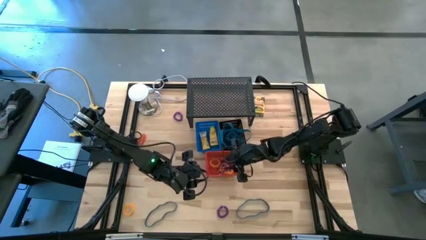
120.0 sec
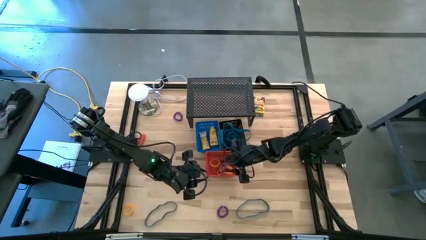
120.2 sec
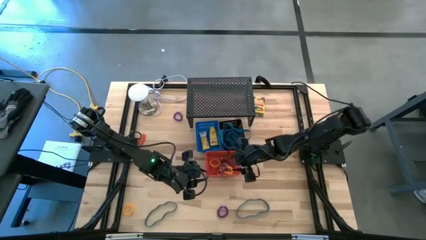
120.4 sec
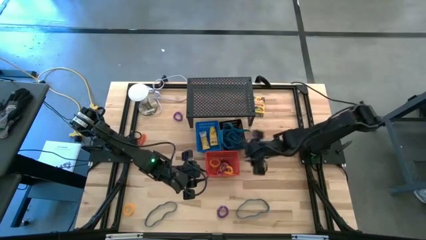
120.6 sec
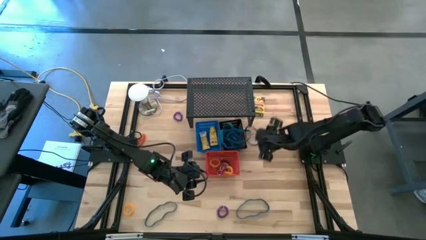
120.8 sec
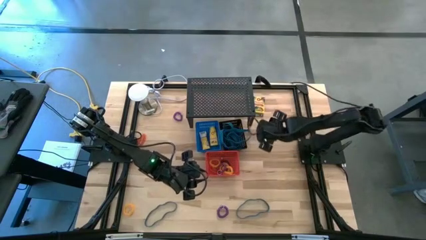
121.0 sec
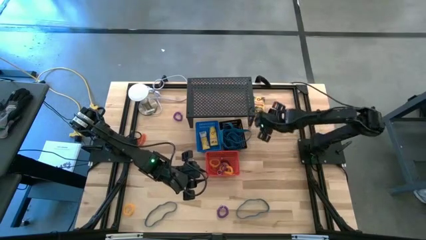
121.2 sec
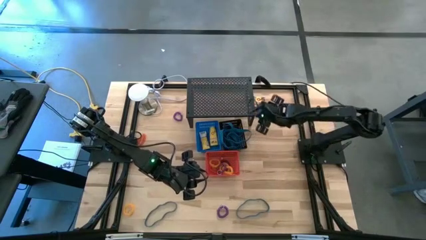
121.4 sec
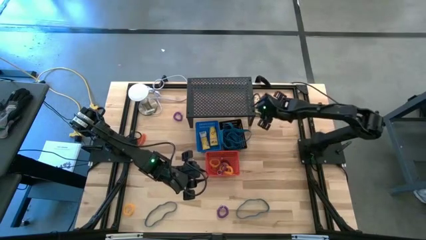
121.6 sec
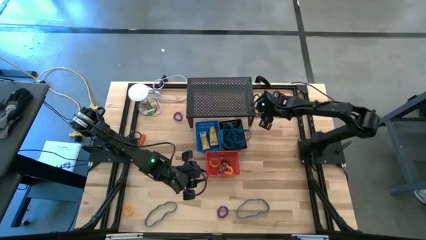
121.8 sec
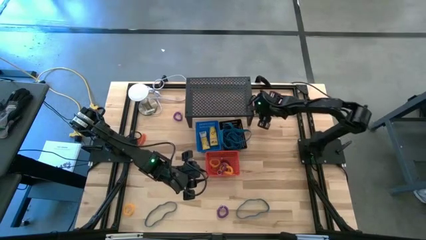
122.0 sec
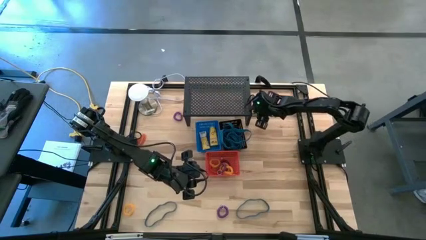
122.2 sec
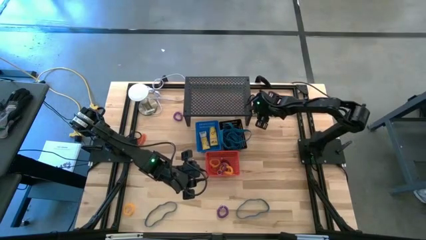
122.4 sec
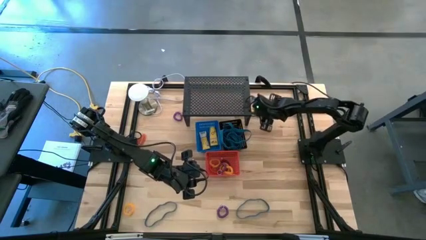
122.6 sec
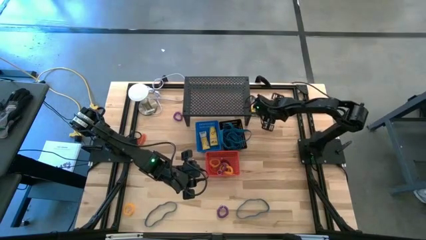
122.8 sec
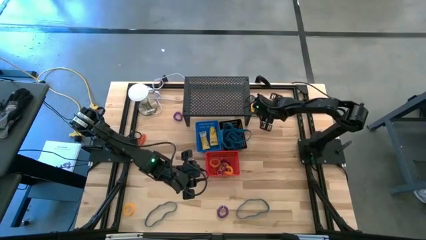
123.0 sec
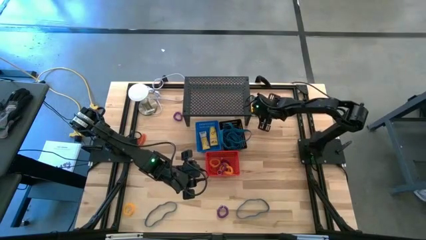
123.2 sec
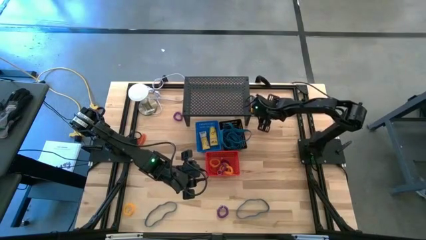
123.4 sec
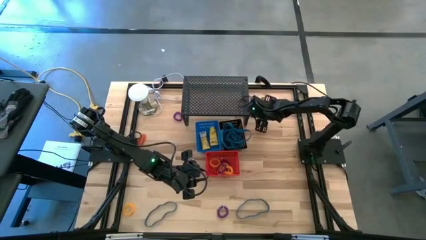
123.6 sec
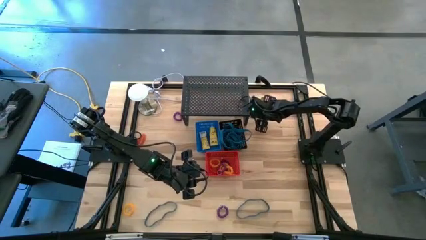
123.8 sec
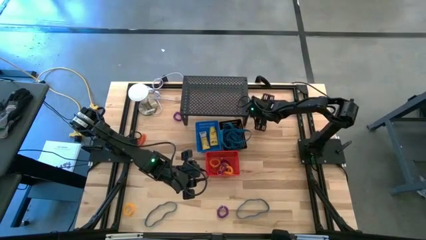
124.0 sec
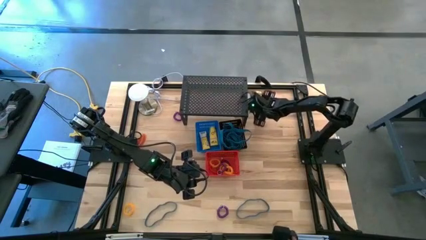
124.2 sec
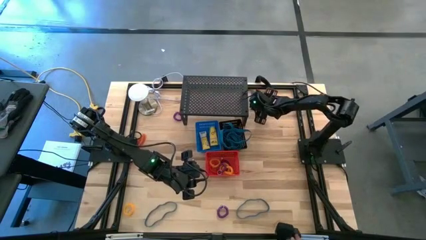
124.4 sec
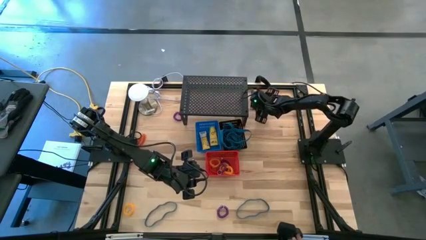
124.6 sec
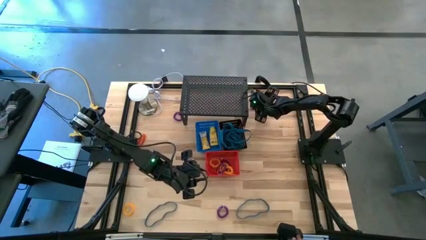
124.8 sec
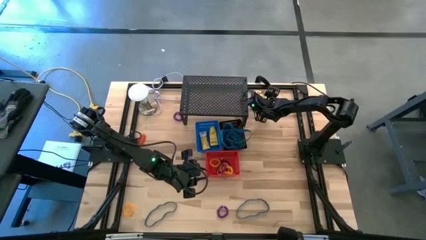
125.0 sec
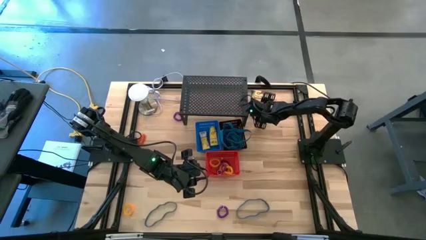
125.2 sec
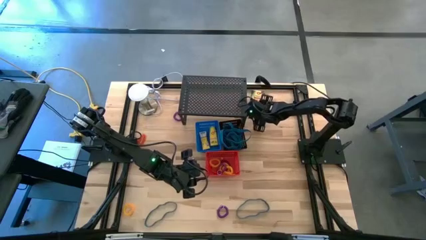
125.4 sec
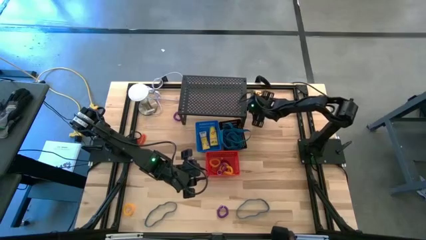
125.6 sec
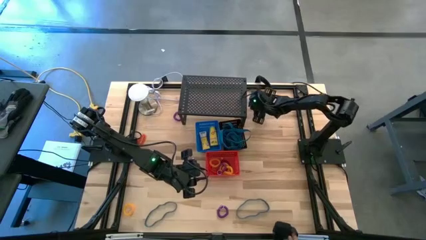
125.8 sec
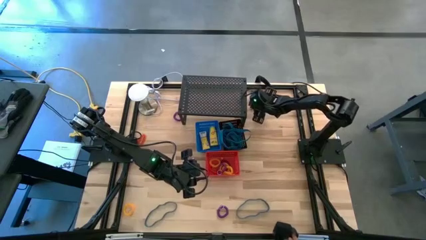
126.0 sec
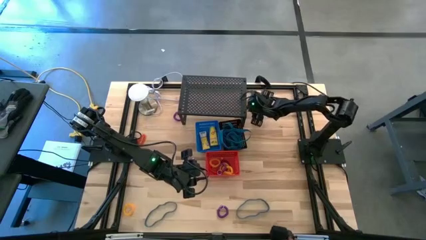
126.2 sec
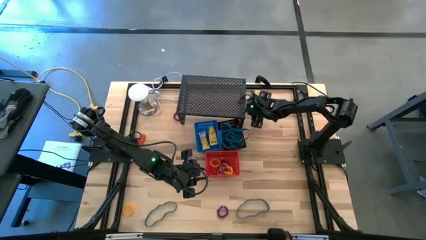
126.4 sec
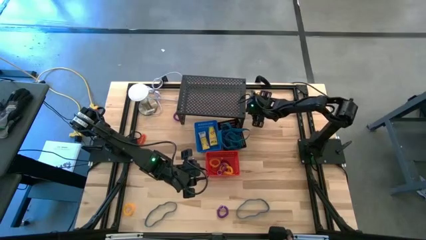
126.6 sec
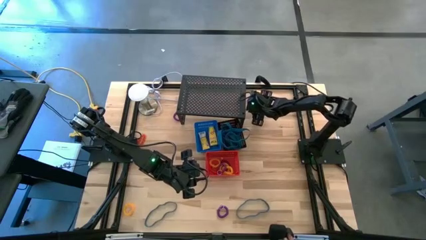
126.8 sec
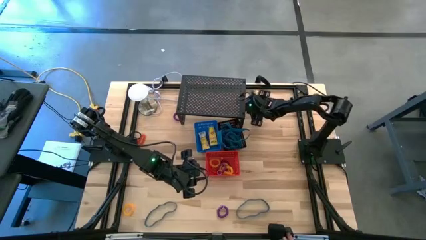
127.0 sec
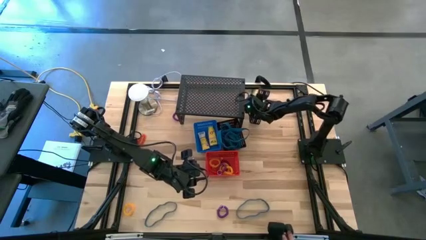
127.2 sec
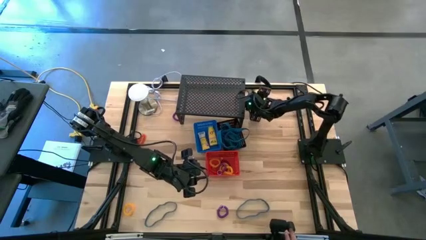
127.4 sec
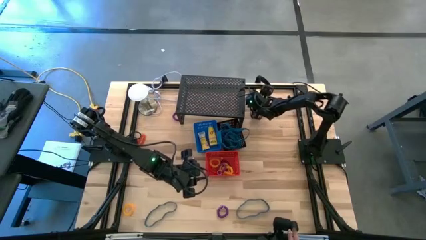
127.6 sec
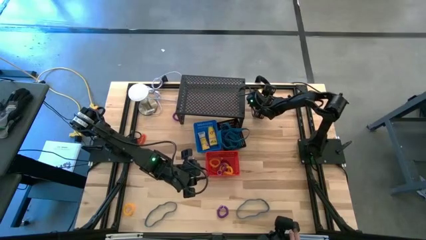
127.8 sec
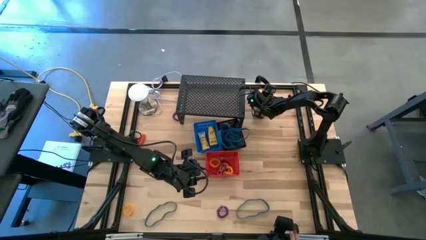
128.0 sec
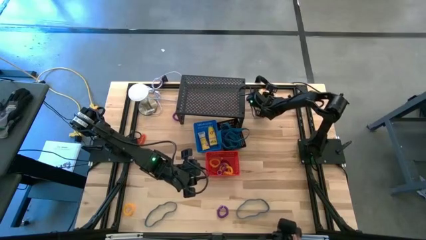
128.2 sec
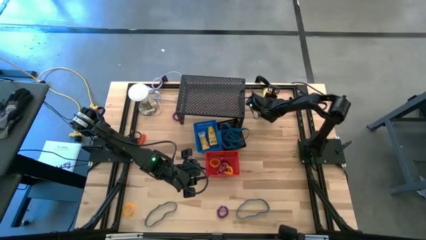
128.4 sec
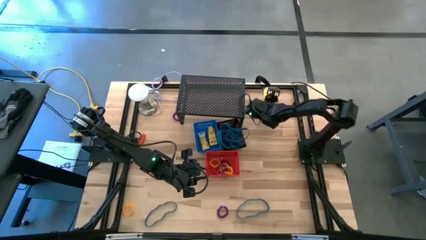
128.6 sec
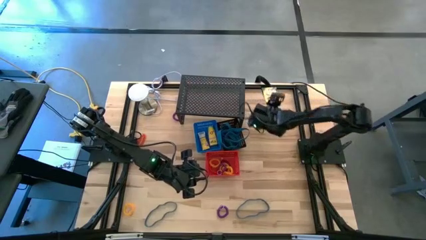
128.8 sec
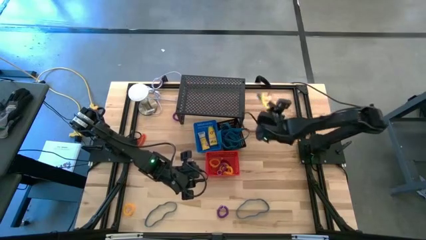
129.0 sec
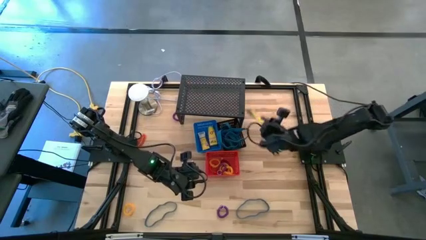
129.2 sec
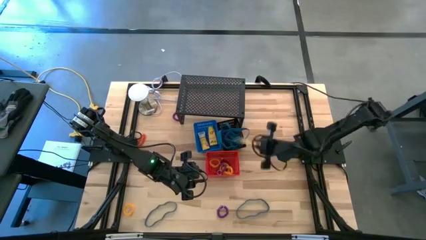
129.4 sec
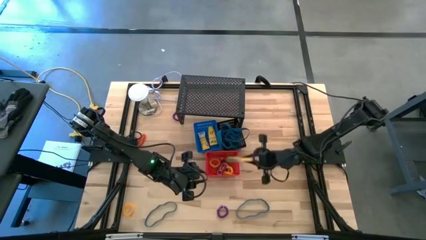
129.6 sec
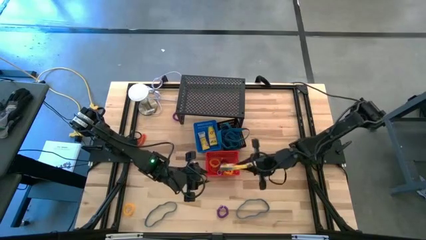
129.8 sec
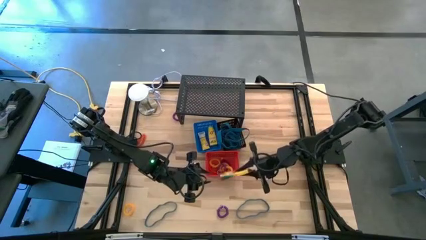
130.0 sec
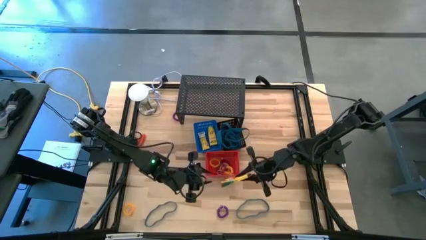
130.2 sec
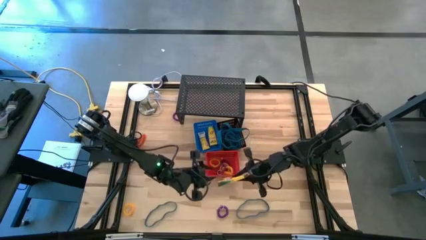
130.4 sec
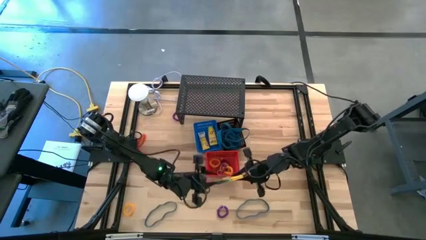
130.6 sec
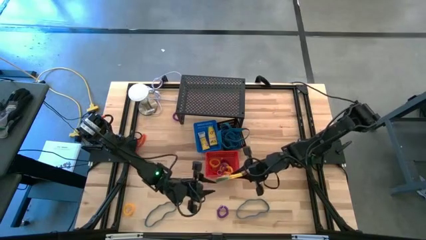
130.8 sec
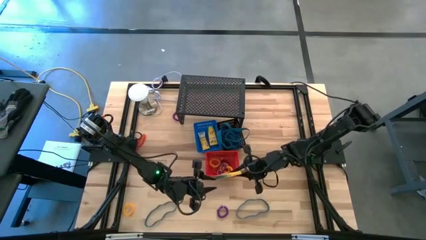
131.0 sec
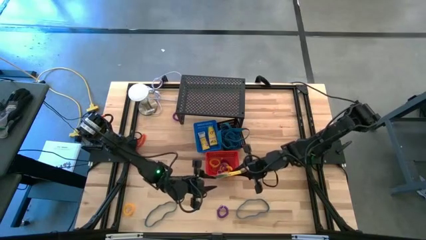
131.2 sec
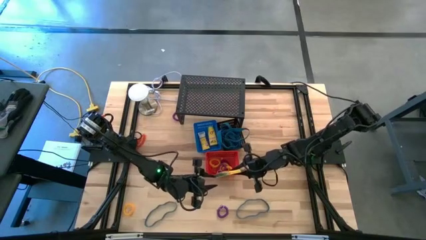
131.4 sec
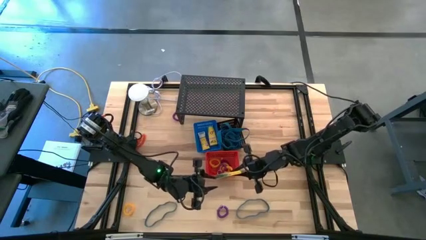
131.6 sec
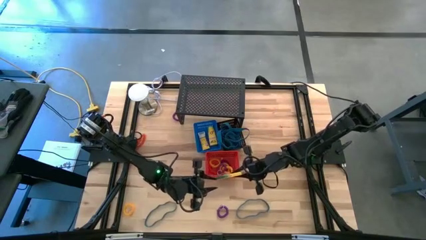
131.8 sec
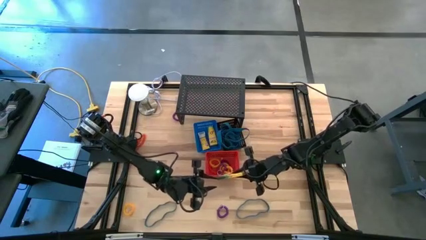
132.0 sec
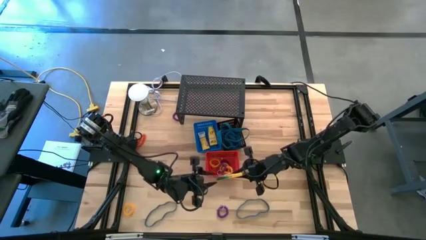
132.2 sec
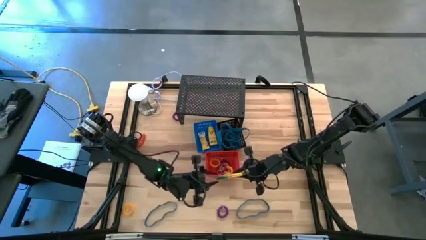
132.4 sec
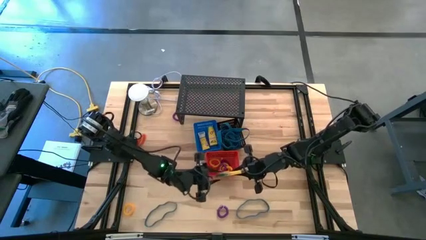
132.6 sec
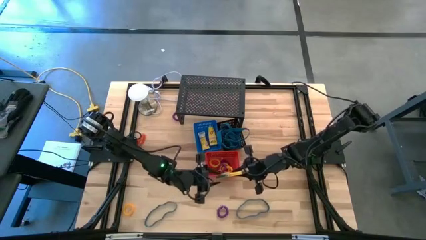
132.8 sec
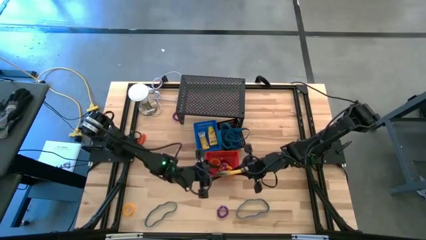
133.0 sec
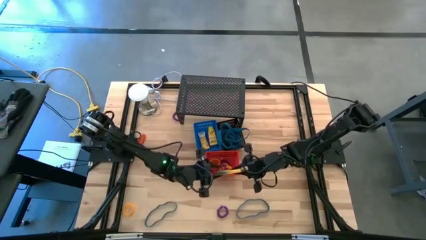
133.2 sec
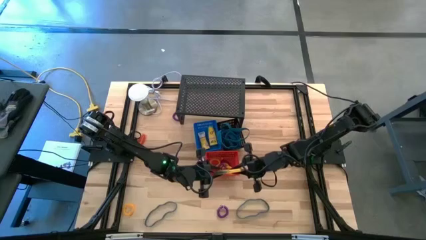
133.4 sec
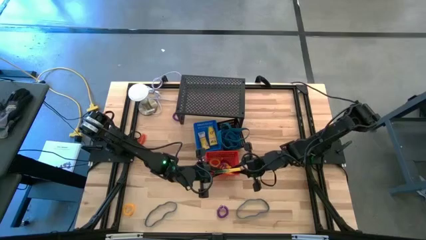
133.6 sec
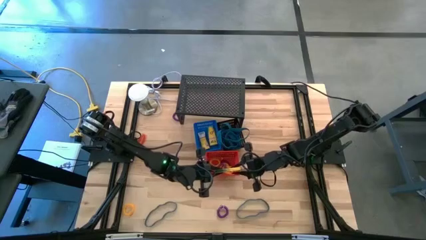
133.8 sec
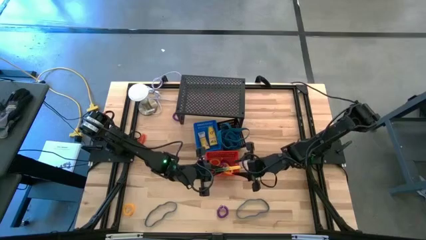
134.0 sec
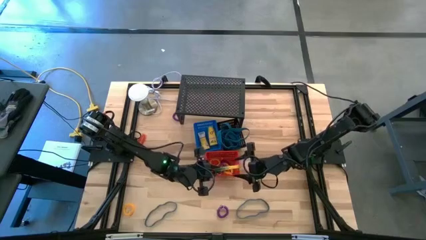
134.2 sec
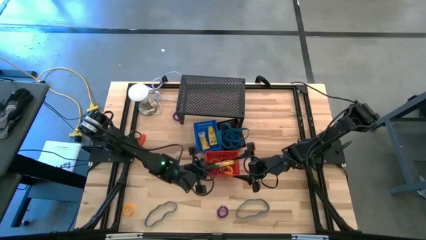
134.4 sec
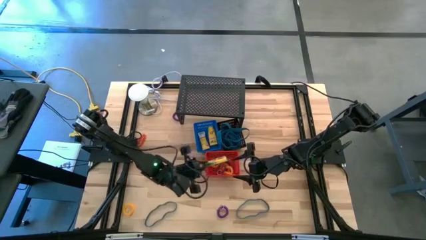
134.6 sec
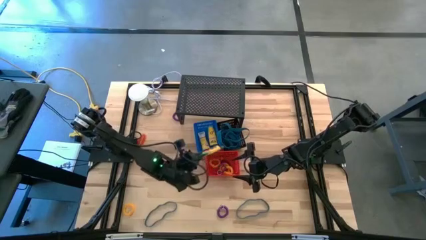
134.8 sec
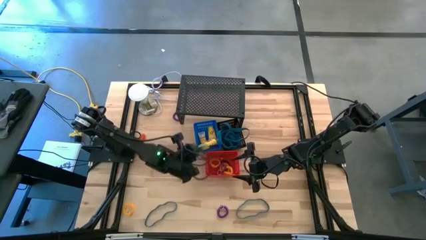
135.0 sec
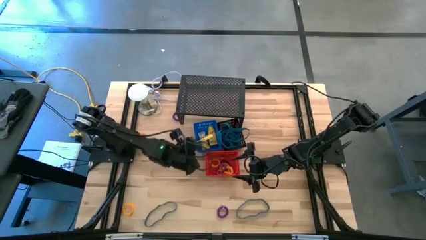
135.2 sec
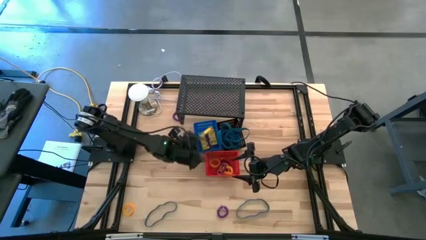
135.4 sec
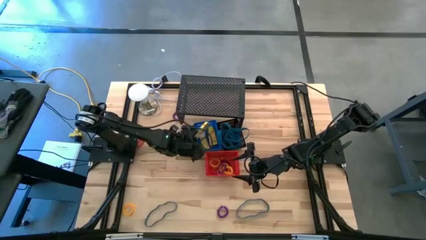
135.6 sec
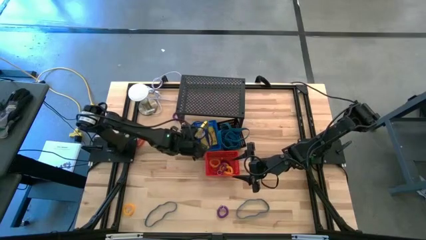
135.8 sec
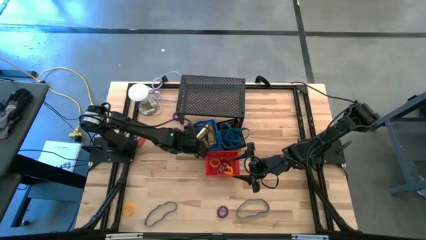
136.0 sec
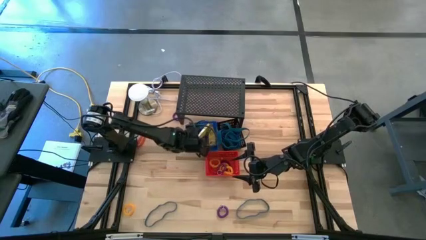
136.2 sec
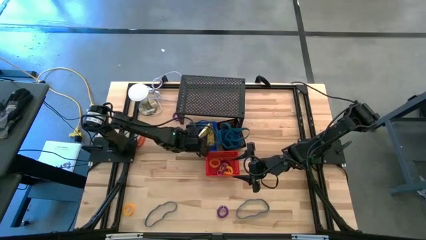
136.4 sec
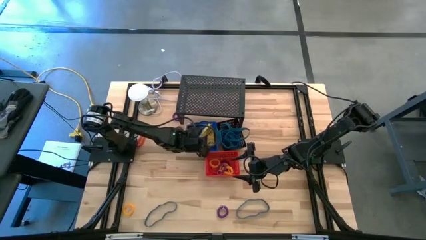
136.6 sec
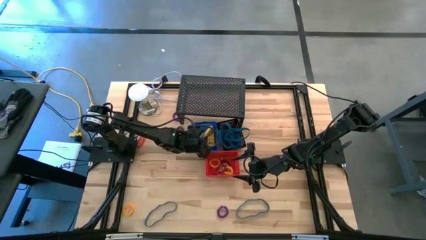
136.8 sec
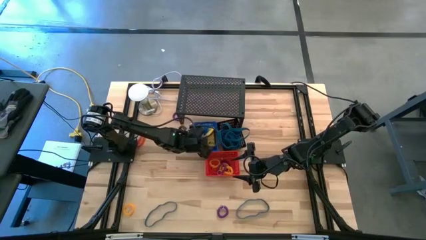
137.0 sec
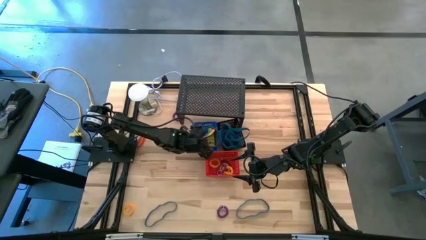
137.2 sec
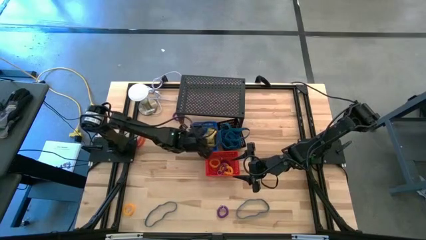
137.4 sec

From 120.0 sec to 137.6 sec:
Task: Pick & Place Office Desk Supplies
Put the yellow crayon box into the blue bin
